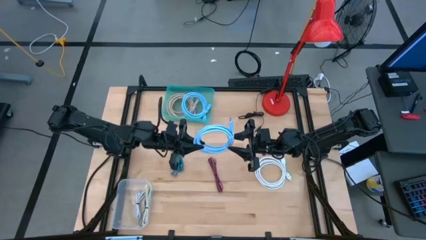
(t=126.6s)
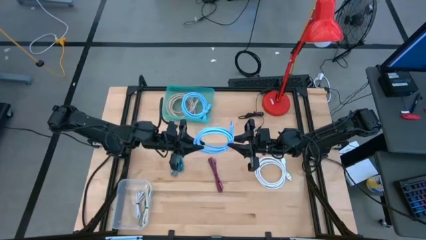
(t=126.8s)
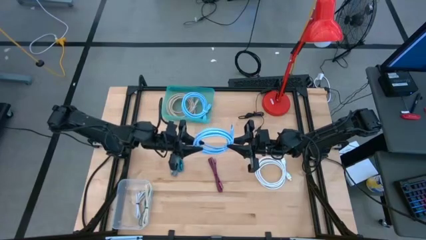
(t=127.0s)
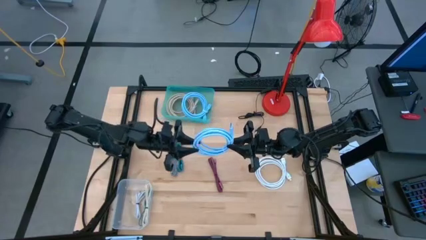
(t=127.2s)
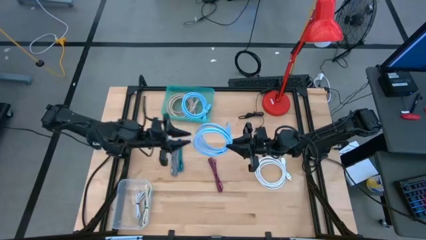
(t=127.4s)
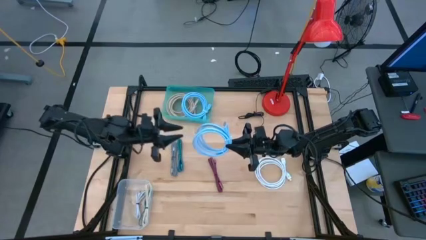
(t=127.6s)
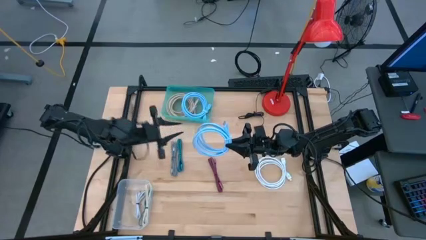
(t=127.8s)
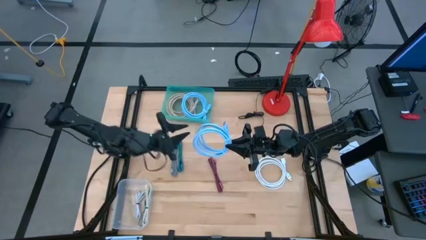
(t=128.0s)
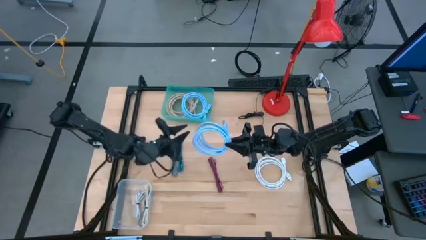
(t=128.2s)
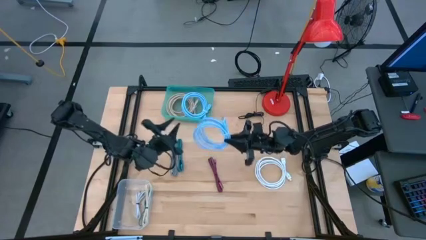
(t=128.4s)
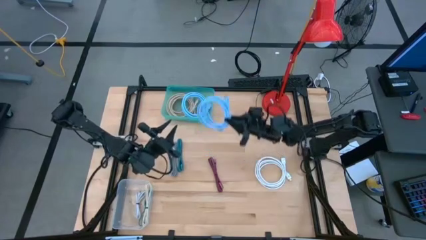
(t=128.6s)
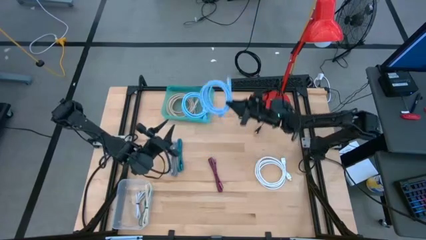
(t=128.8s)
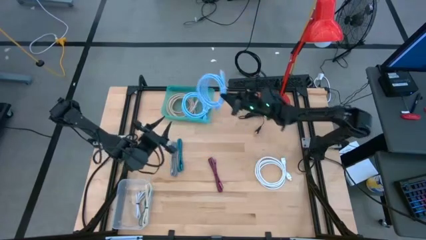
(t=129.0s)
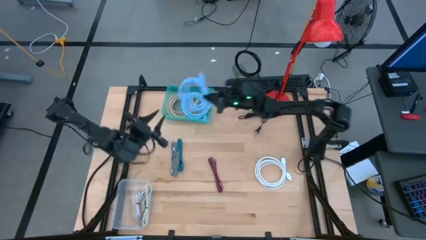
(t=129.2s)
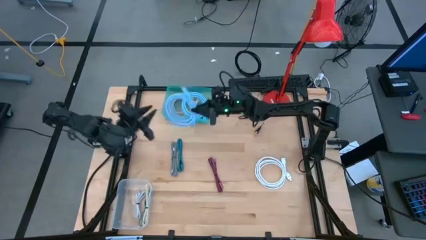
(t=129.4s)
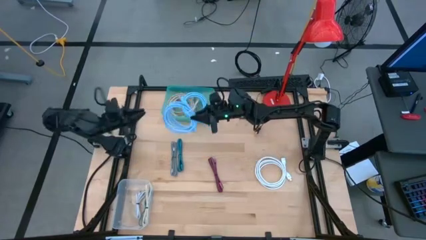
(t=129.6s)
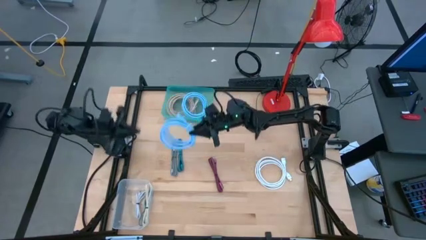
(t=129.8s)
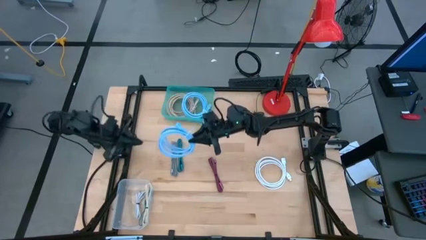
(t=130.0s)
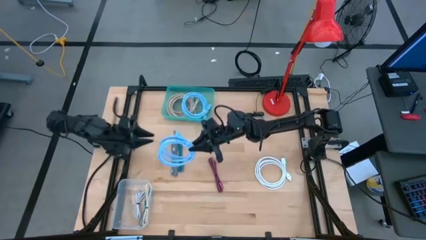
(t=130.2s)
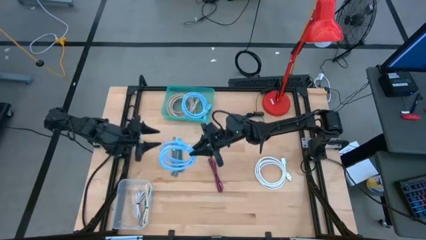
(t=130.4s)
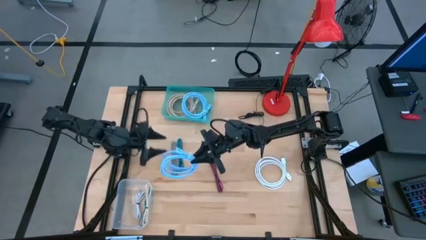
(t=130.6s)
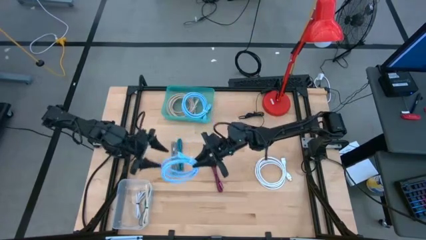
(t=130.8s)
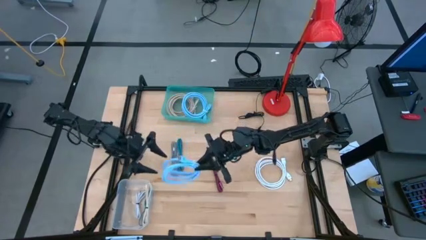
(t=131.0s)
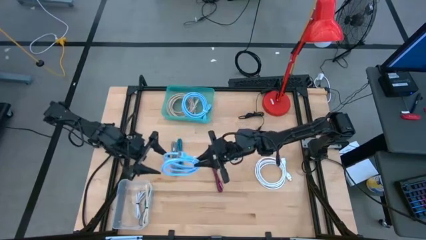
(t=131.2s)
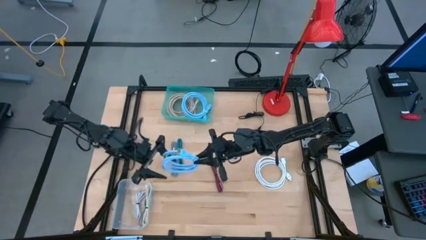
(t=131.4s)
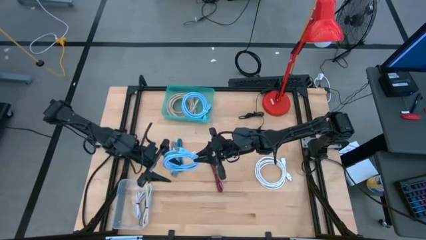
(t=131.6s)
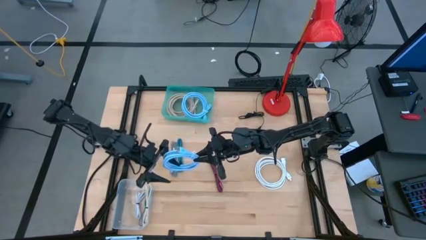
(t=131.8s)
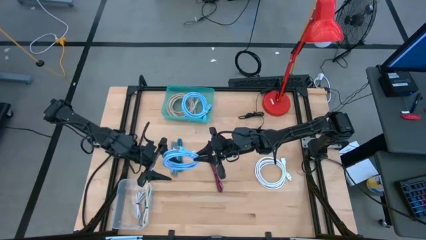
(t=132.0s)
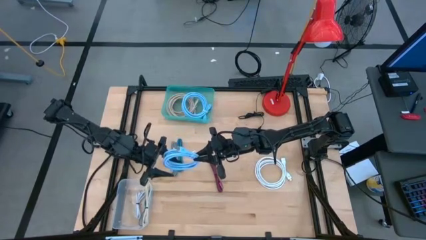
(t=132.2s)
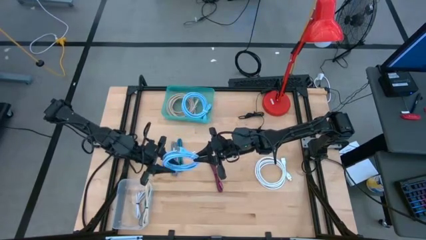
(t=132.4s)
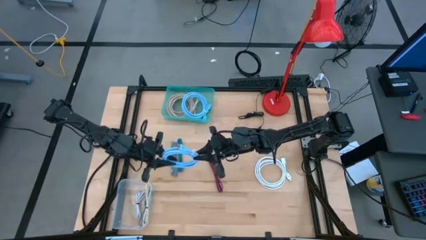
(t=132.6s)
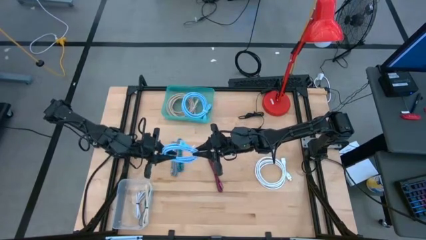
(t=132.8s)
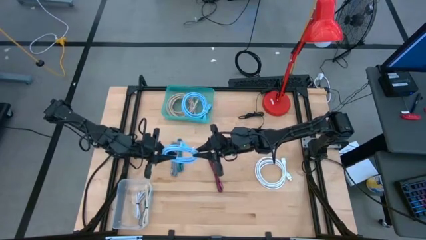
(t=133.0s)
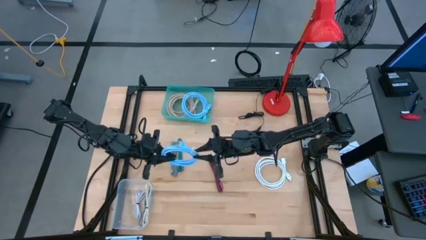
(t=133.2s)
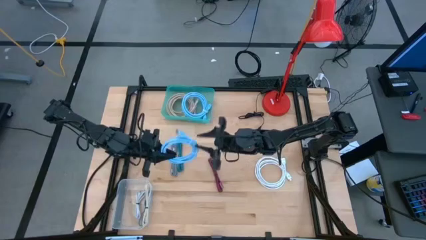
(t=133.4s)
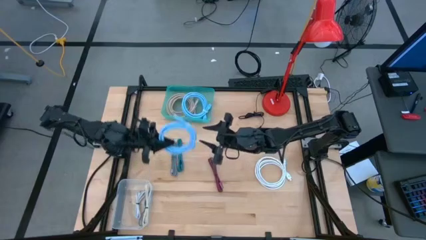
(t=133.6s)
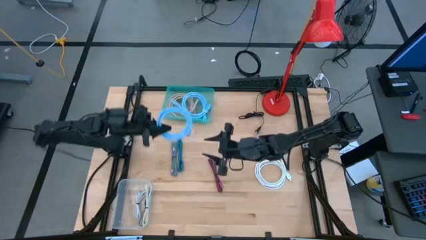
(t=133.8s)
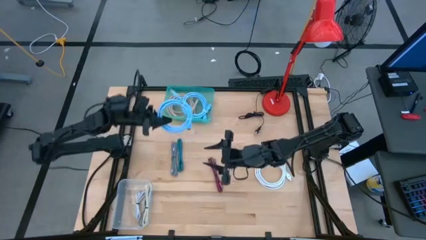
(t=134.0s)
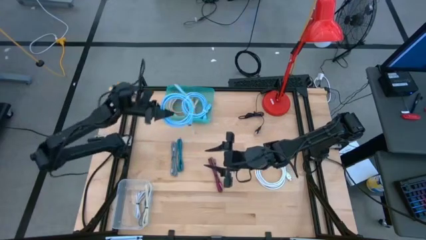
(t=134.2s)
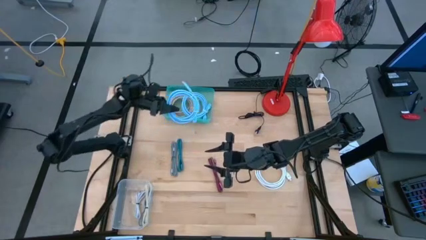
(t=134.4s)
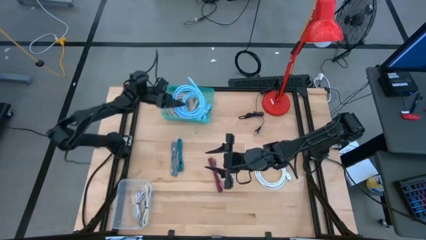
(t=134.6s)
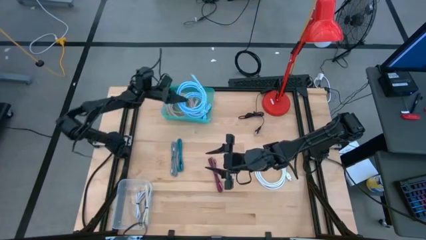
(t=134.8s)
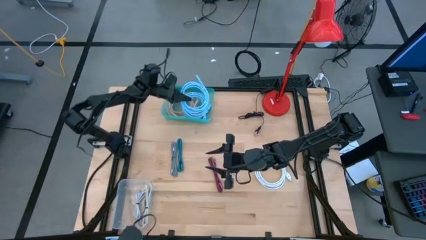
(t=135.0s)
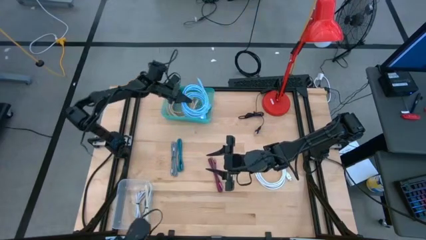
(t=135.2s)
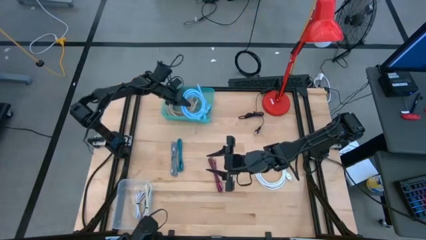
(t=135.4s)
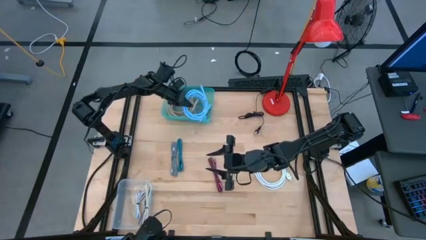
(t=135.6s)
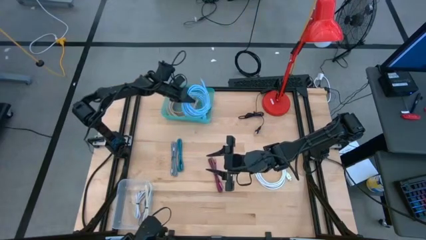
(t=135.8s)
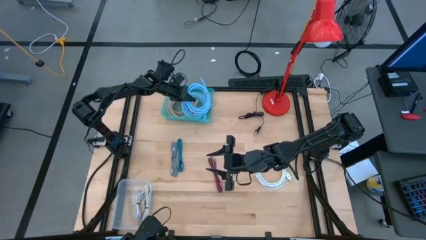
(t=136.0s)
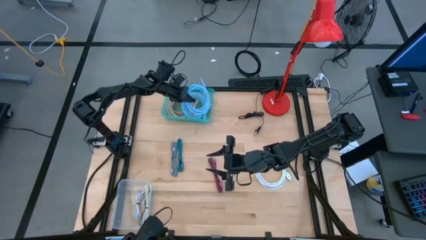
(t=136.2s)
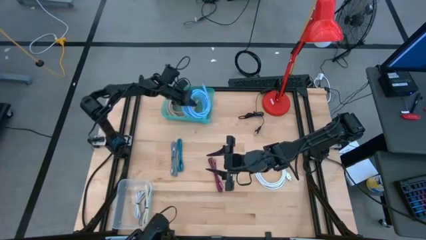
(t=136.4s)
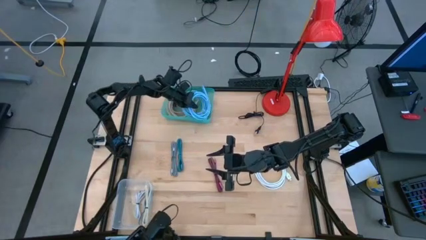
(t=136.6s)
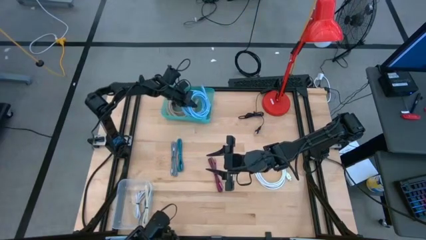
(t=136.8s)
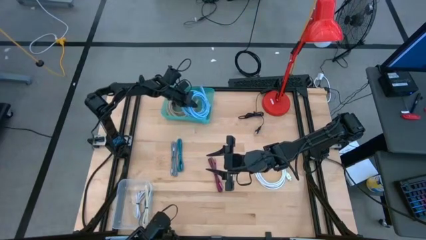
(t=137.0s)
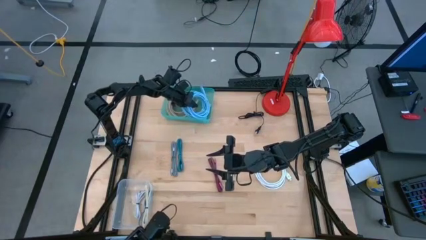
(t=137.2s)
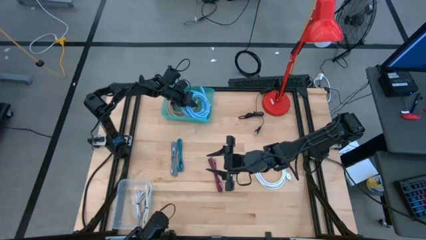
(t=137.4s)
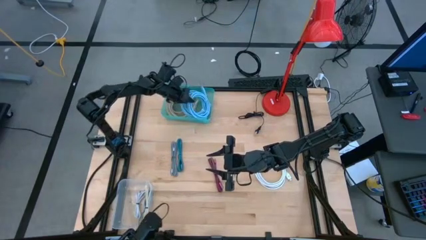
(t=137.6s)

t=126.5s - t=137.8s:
Task: Pick & Place USB Port
Put the blue HDMI cable into the green bin

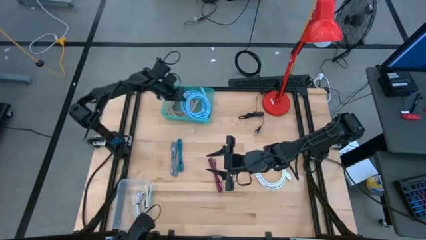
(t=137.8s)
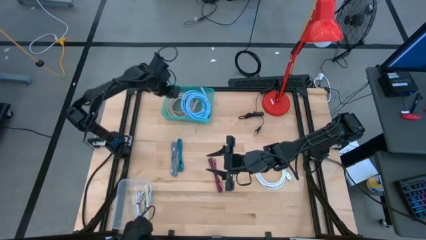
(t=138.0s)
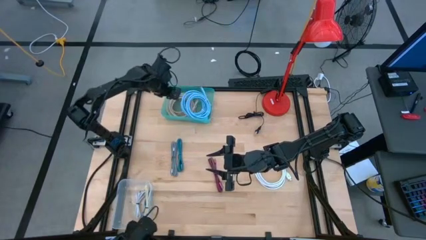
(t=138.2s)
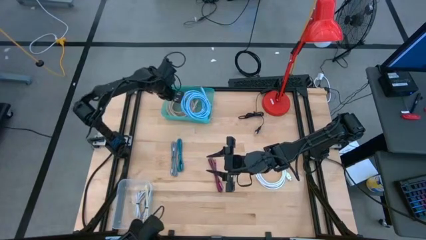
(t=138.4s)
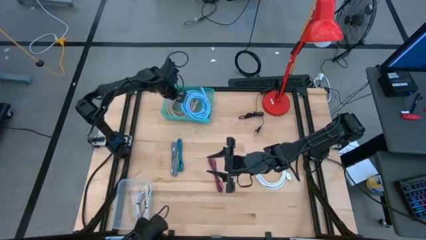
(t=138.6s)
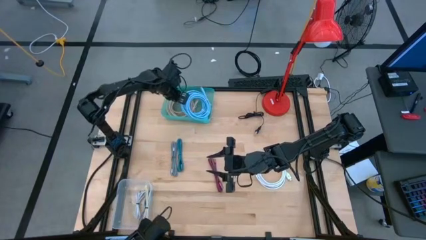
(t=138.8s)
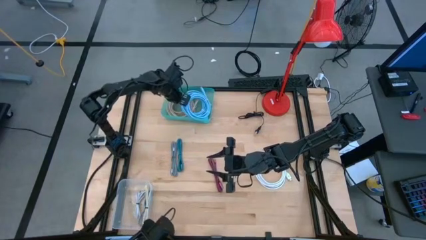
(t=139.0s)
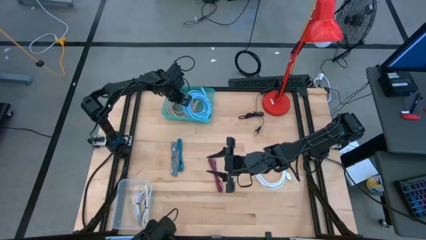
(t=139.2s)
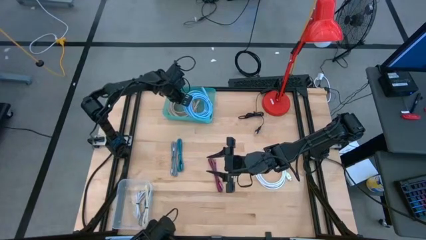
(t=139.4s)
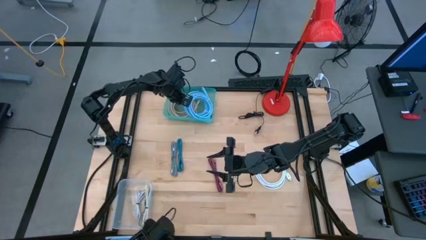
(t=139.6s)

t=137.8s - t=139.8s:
Adjust the blue HDMI Cable into the green bin

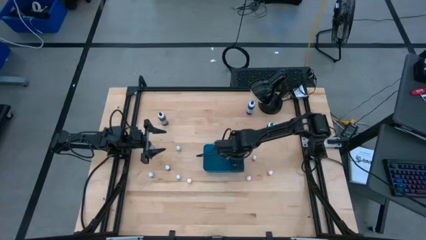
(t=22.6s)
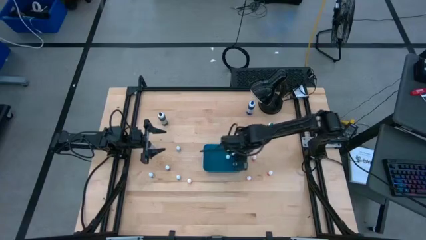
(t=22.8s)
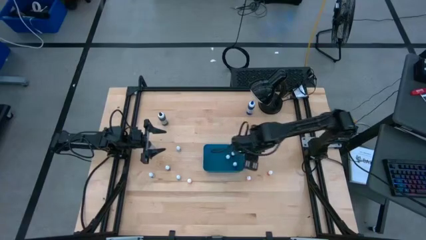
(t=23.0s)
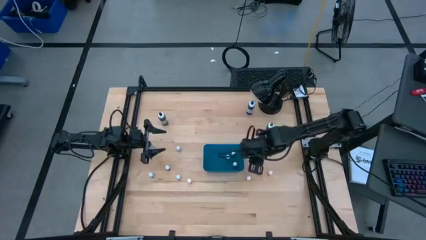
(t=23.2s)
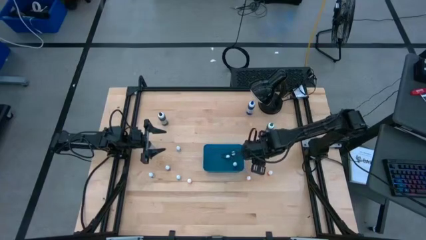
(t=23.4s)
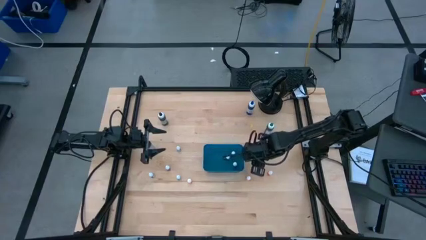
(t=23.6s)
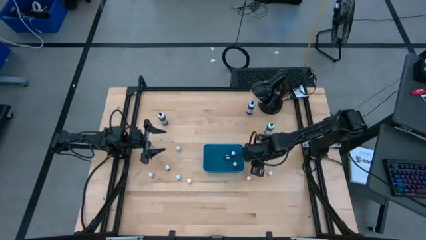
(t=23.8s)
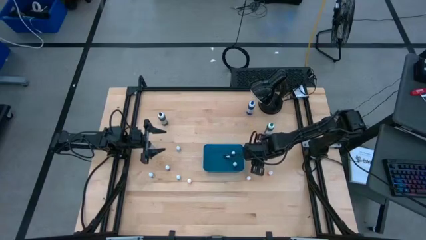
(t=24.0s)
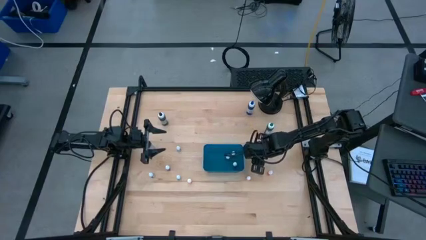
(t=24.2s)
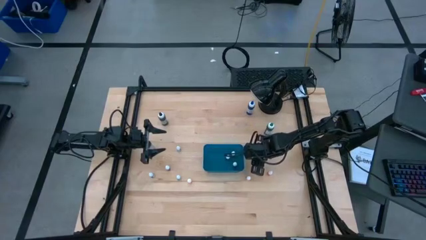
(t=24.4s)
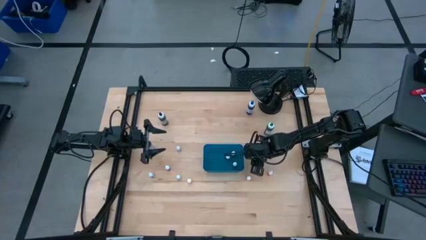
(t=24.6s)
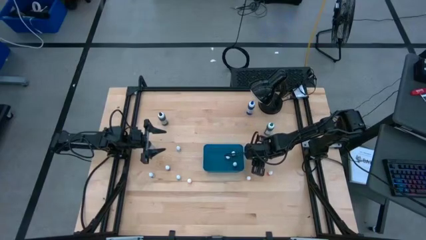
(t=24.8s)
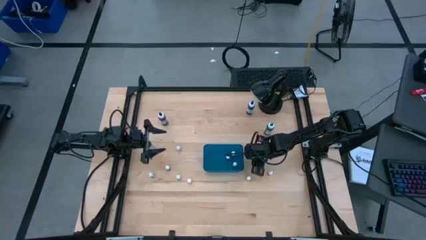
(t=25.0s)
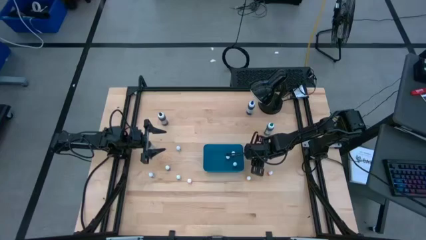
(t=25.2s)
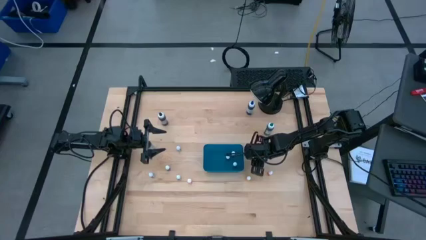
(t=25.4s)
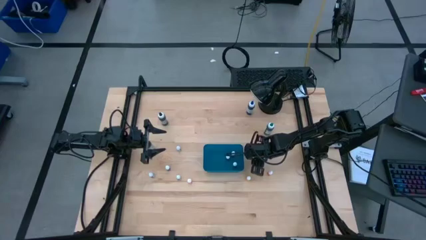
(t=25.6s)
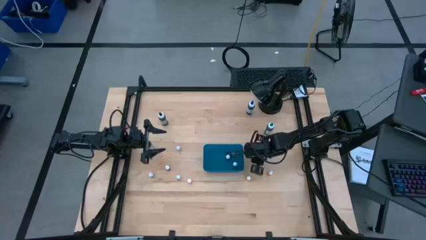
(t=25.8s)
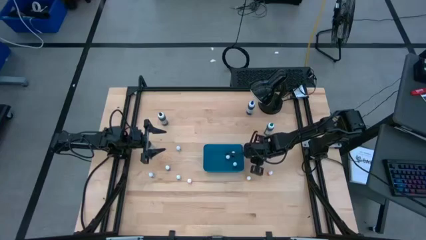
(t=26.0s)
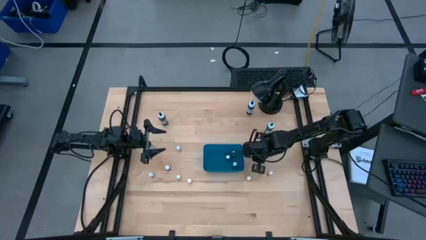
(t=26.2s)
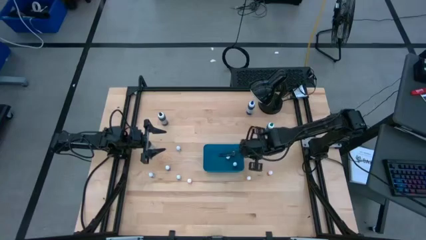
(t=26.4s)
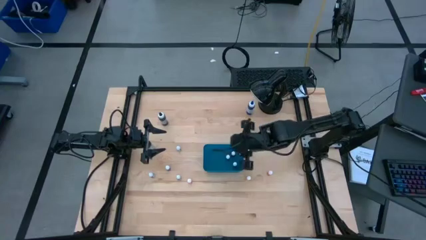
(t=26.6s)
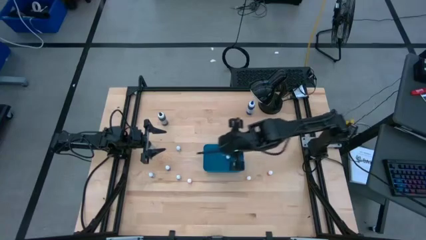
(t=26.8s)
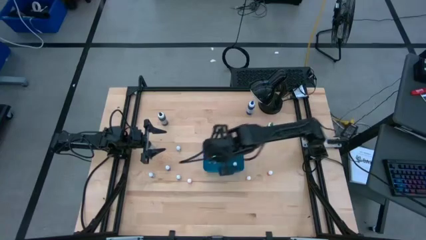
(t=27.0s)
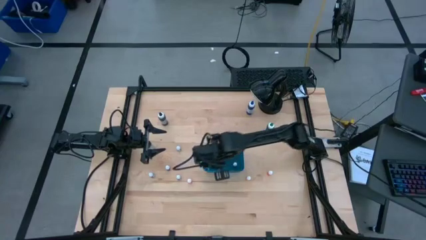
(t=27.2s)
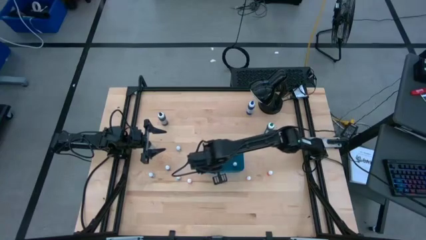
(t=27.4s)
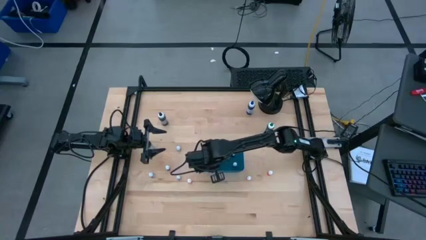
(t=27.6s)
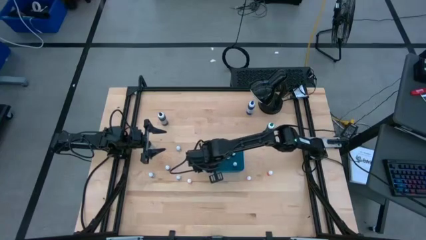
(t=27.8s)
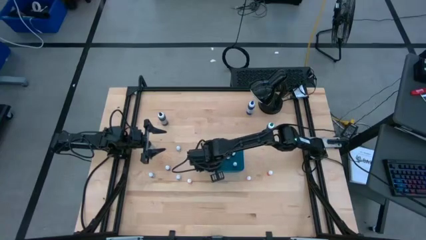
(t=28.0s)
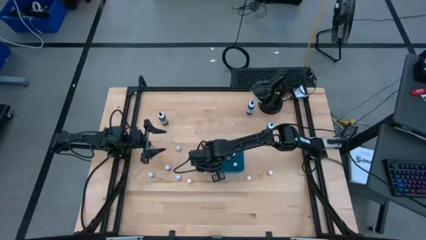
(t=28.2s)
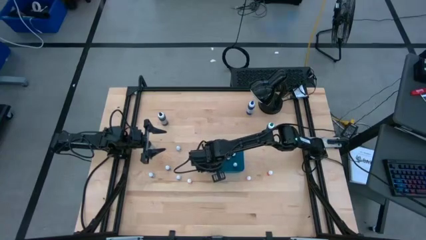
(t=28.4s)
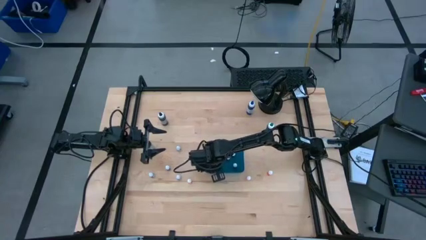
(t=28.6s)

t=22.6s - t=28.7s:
Task: Pick & Place food coloring
Put the small orange food coloring bottle into the blue bin
